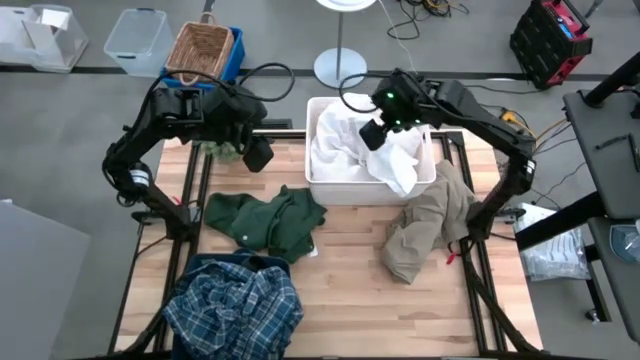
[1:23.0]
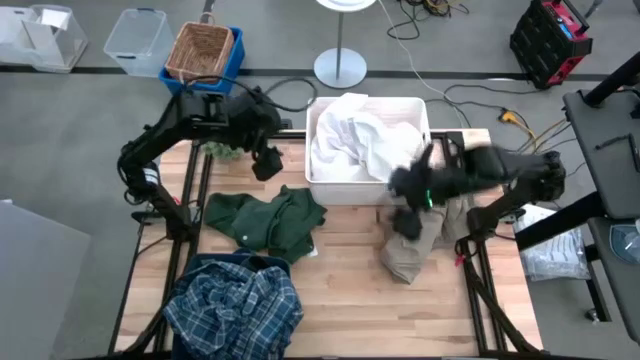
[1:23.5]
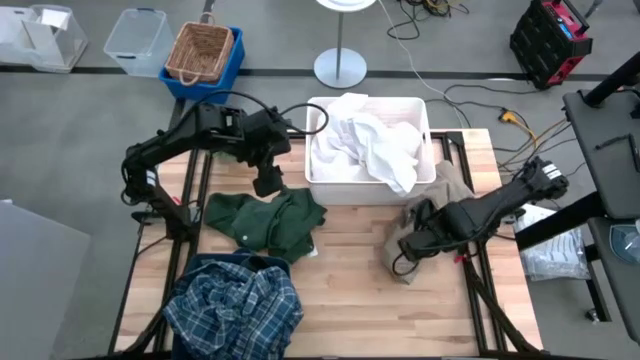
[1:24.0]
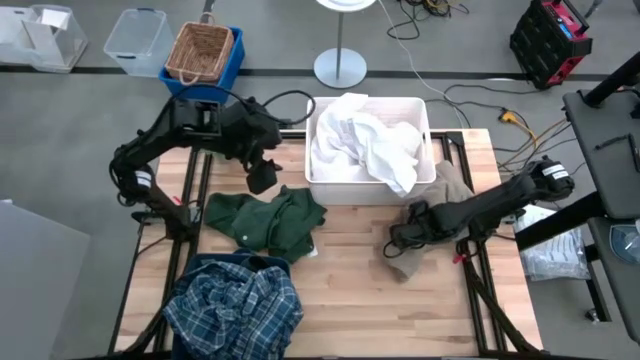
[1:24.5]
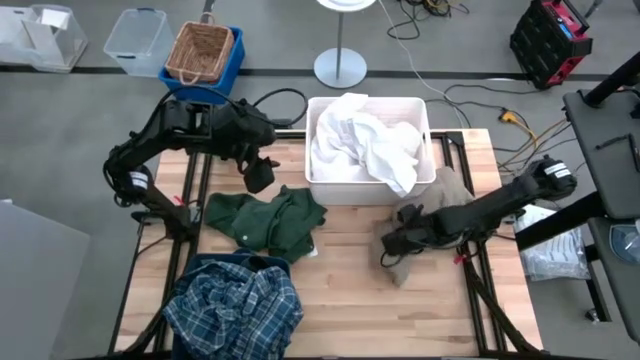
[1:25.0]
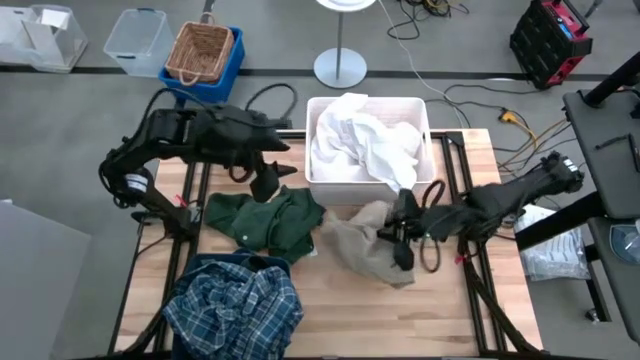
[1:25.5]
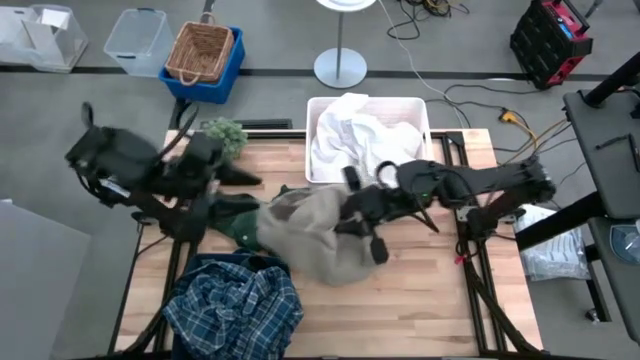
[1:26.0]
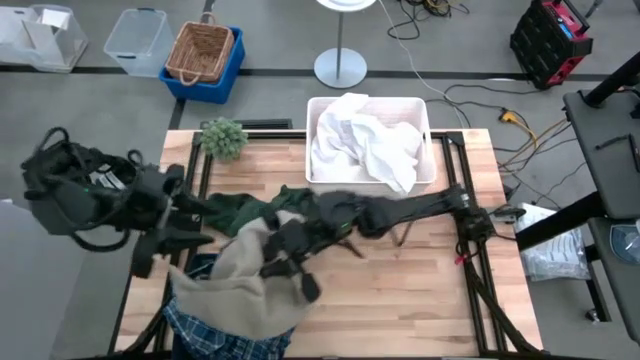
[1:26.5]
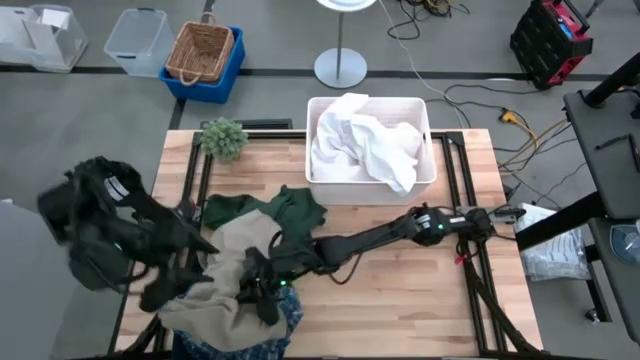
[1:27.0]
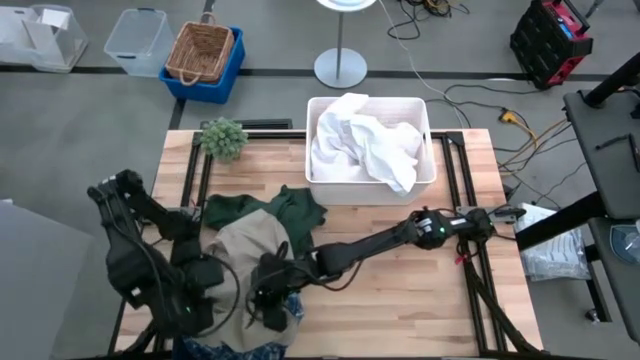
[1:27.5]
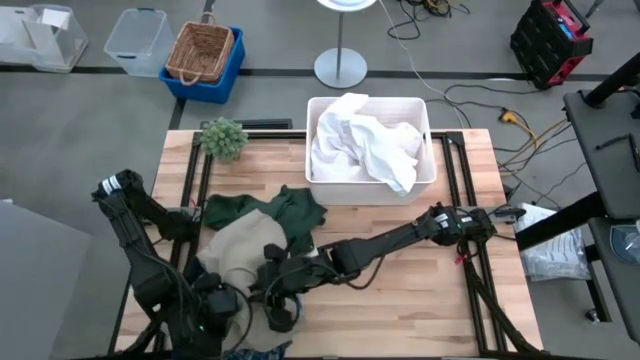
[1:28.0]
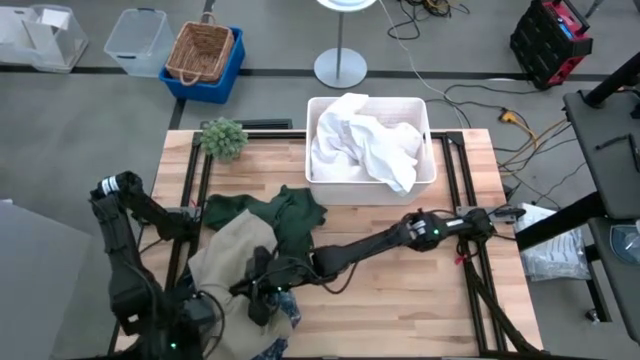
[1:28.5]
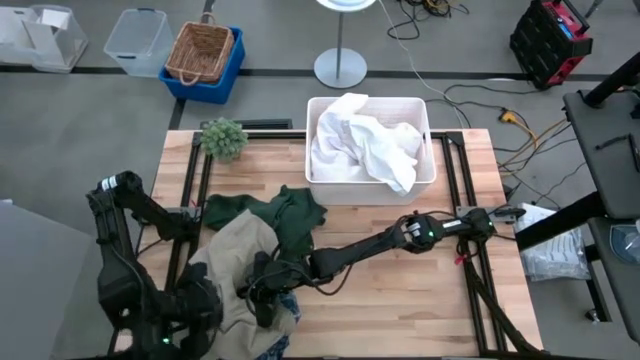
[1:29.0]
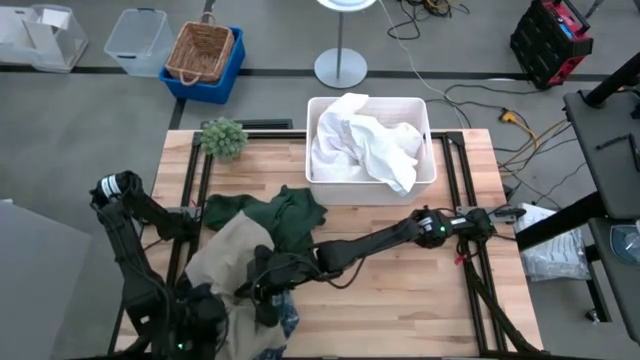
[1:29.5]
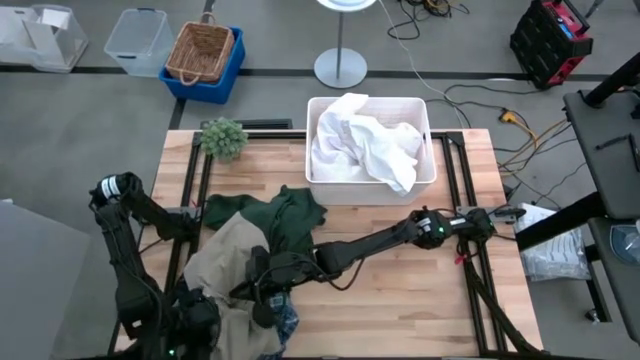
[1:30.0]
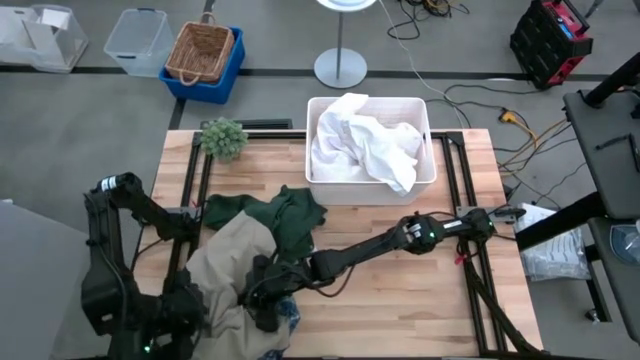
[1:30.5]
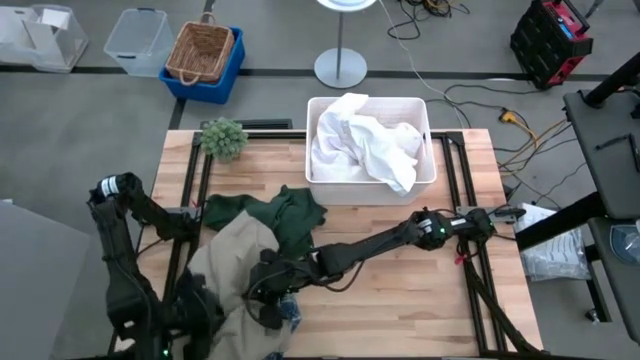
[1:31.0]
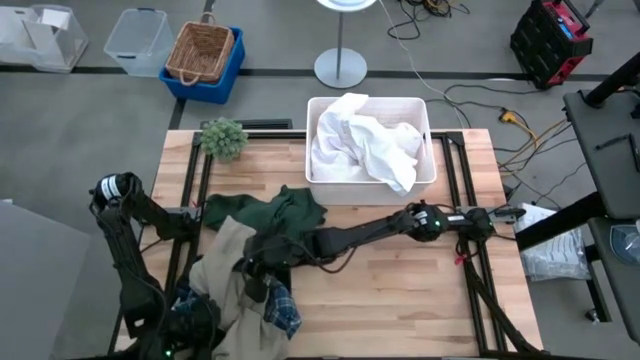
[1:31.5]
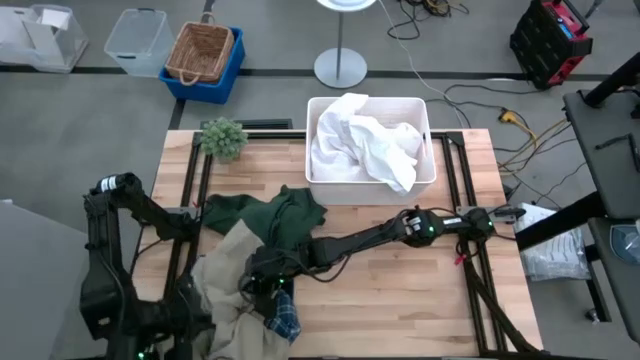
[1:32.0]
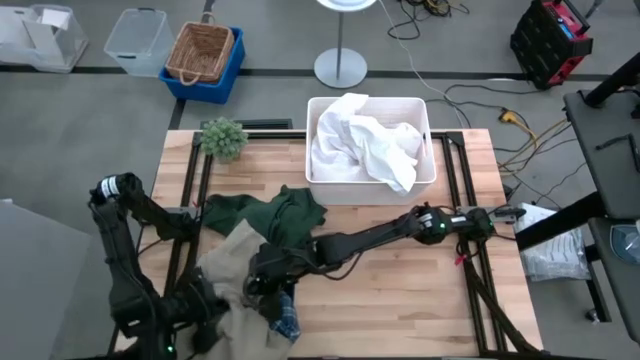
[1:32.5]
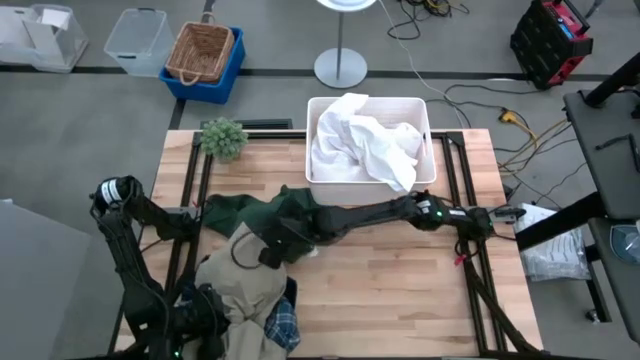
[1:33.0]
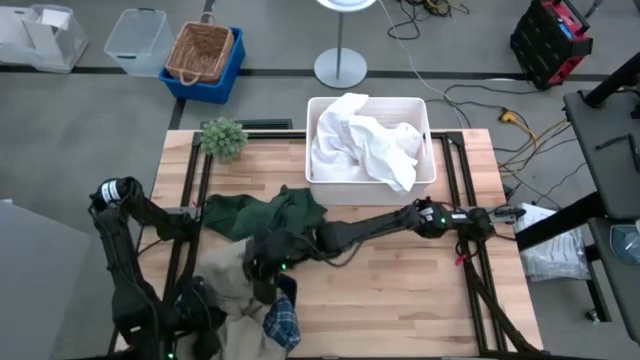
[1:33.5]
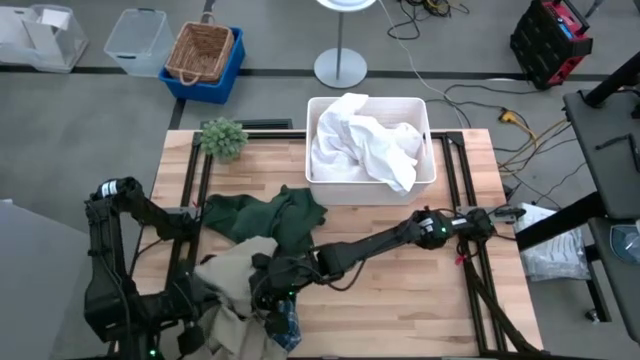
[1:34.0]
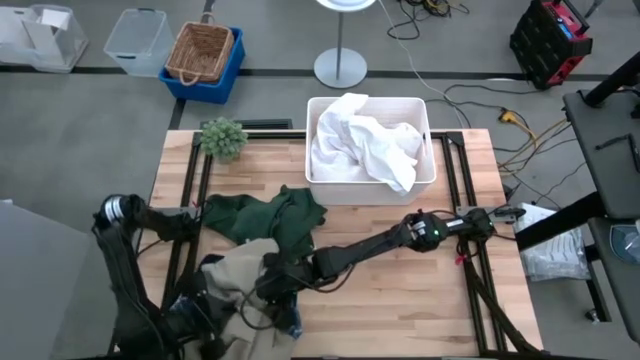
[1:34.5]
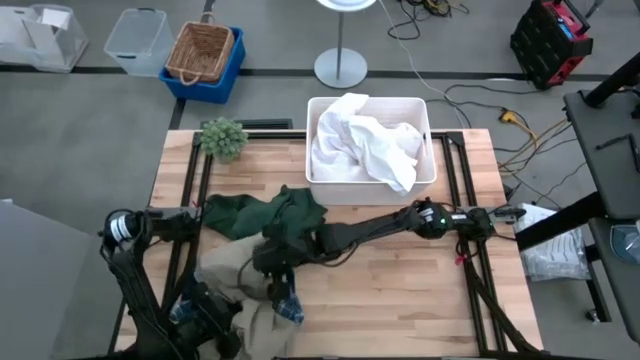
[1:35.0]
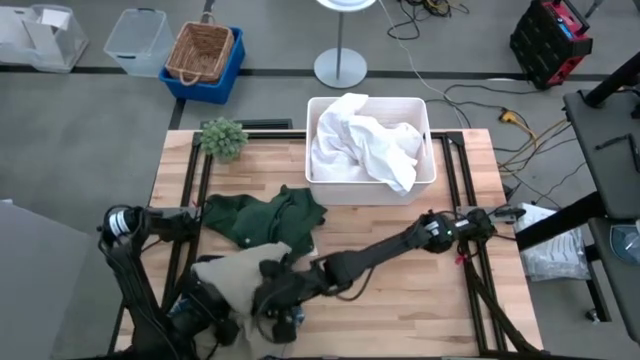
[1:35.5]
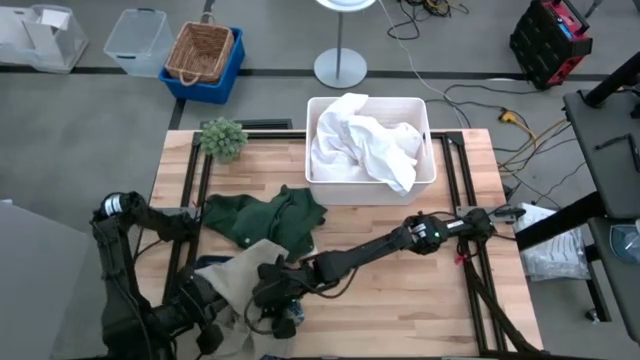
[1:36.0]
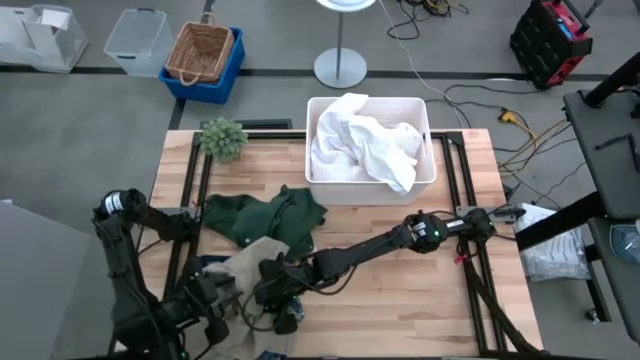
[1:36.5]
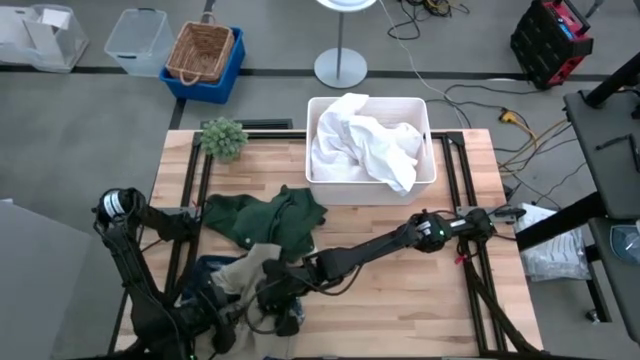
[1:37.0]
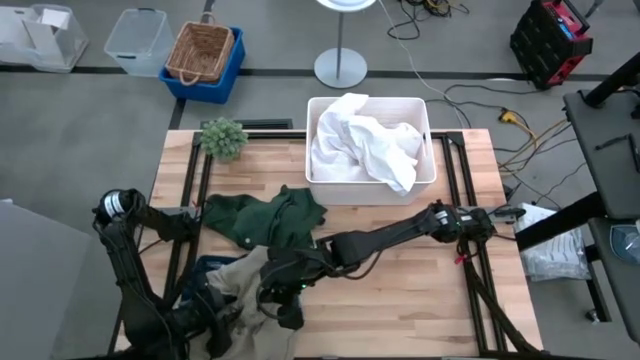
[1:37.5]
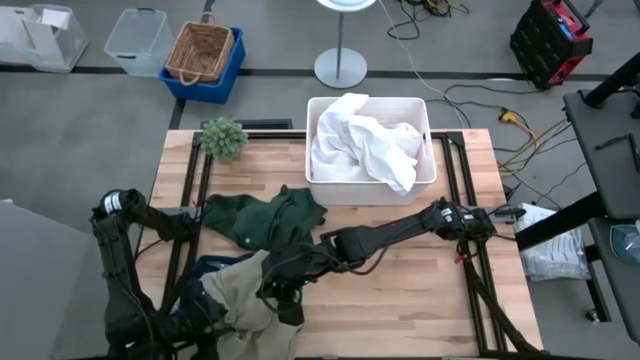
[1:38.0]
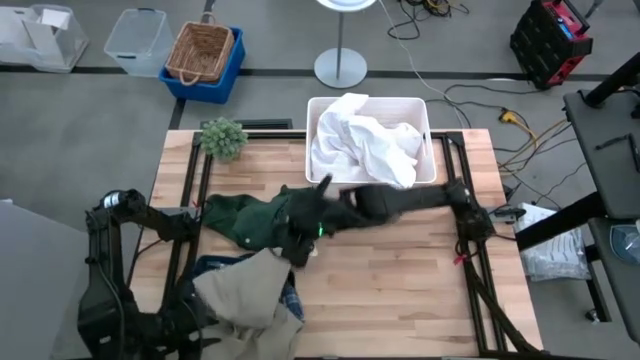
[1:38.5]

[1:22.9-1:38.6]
Task: Sort clothes
Put the brown shorts in the blue bin

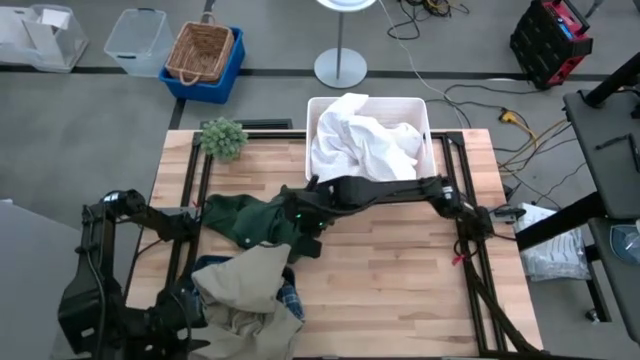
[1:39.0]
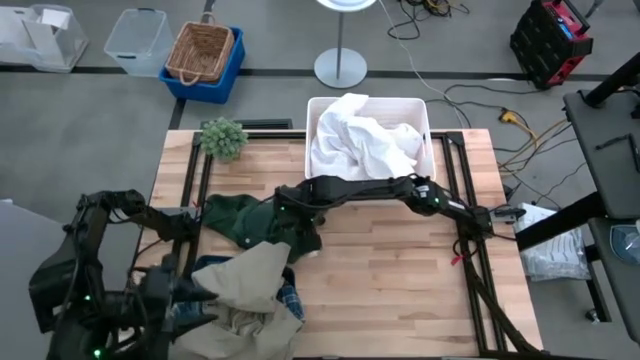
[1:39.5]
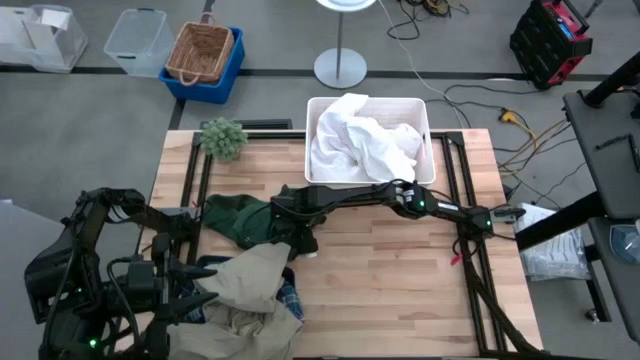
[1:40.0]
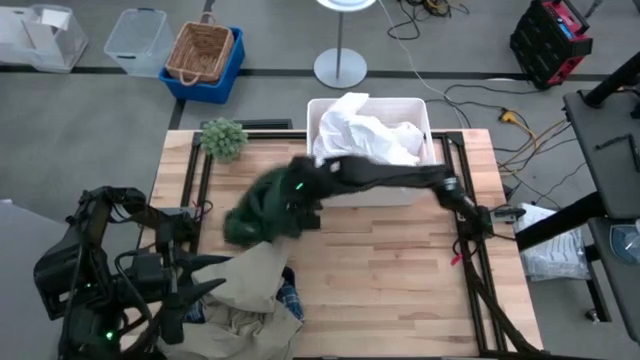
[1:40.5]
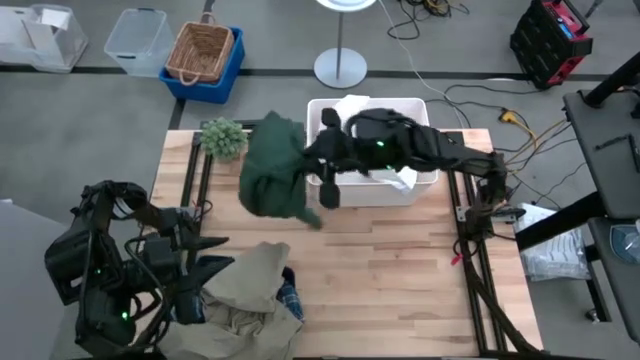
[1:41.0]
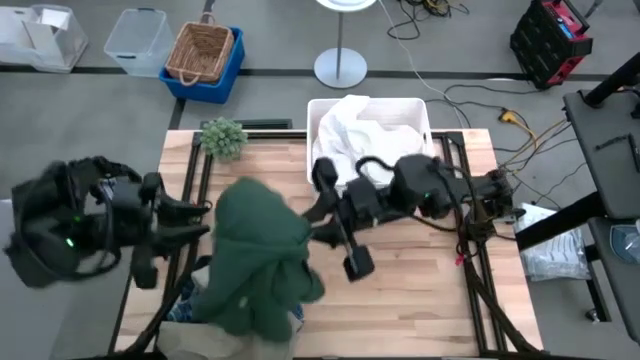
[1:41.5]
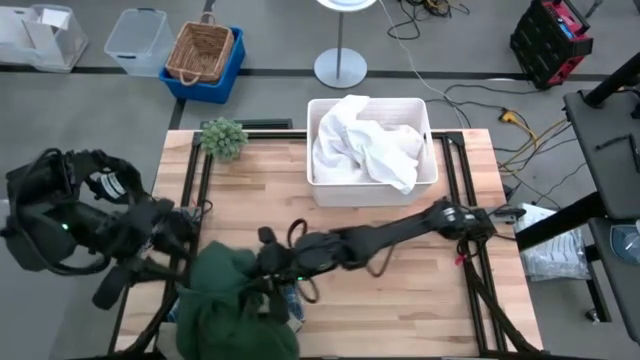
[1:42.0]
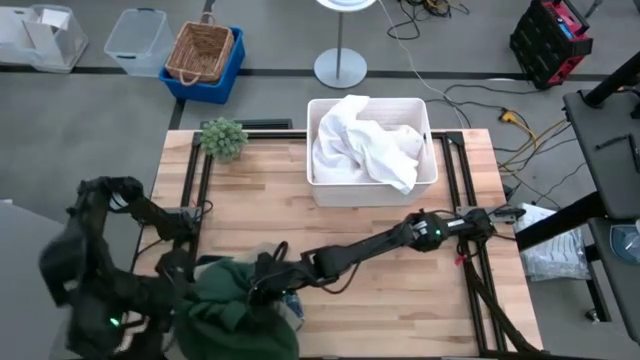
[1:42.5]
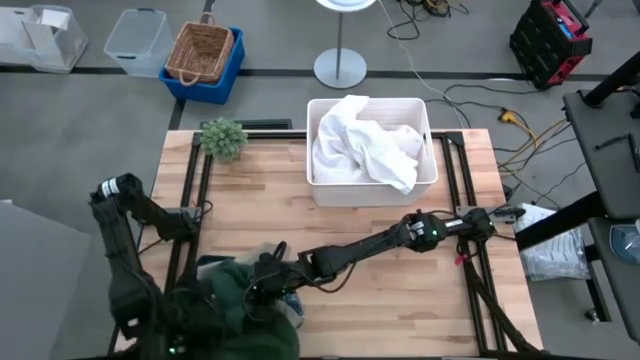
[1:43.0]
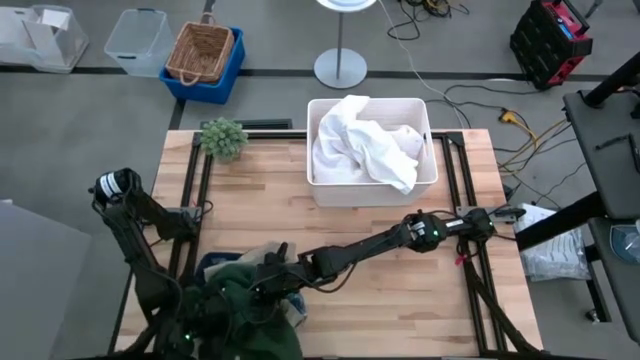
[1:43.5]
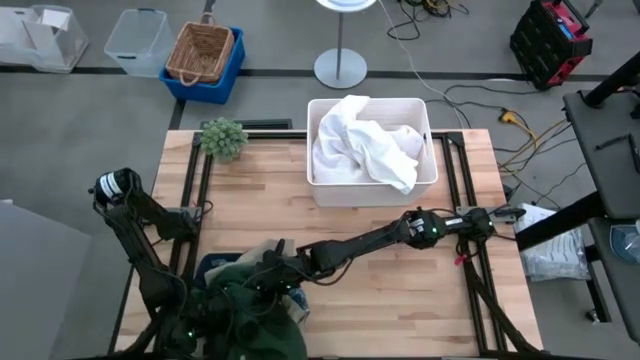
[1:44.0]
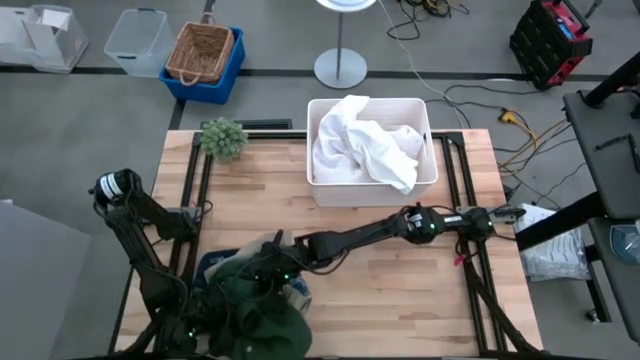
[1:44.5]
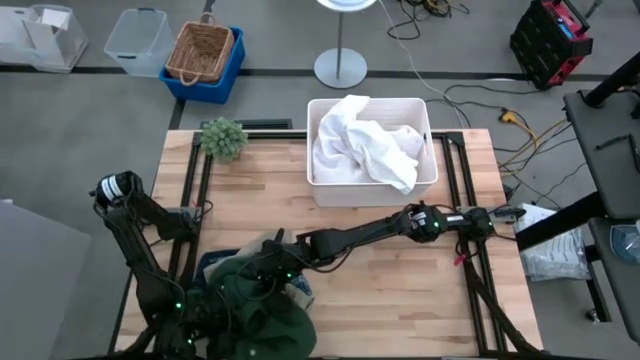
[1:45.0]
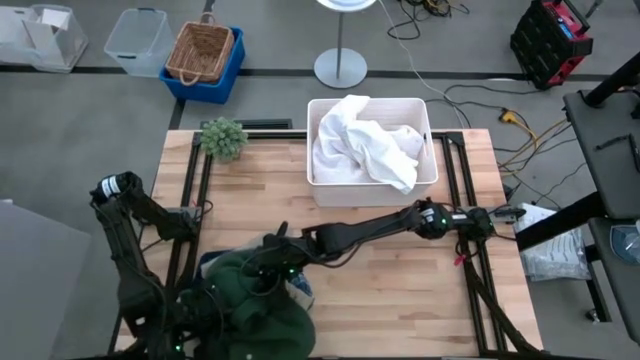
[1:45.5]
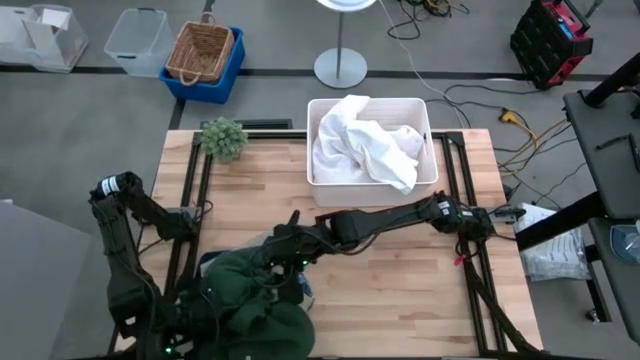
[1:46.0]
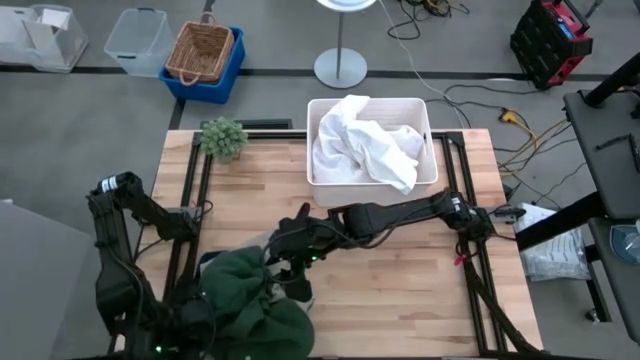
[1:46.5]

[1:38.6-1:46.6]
Put the green shirt in the blue bin
